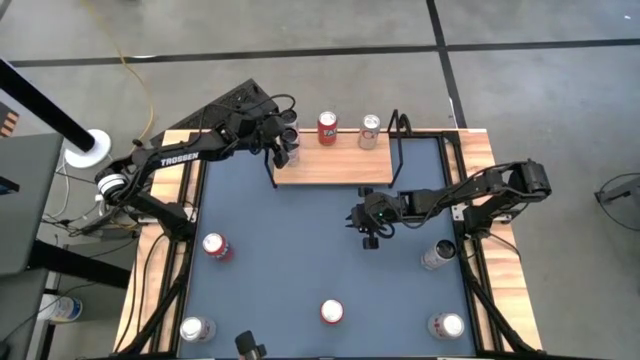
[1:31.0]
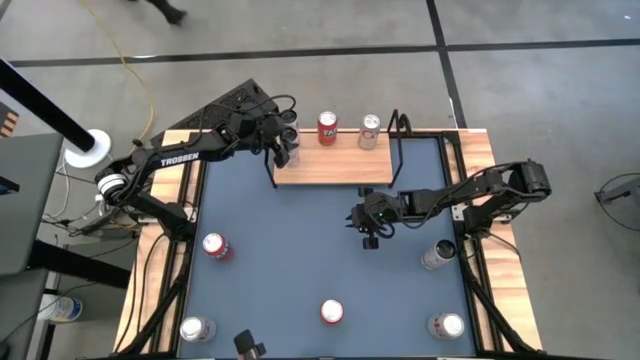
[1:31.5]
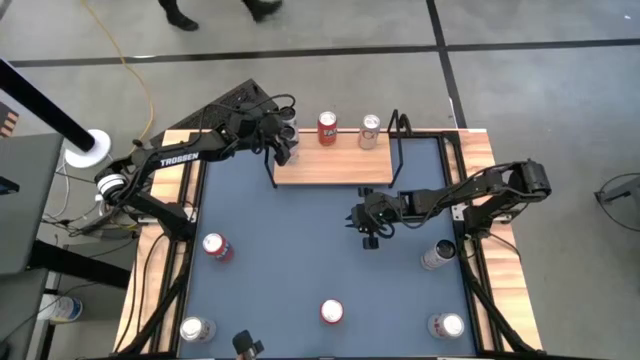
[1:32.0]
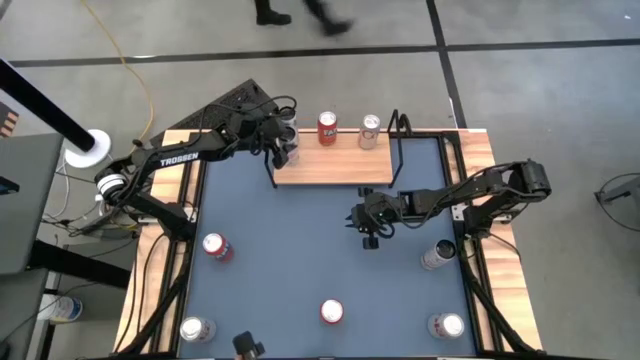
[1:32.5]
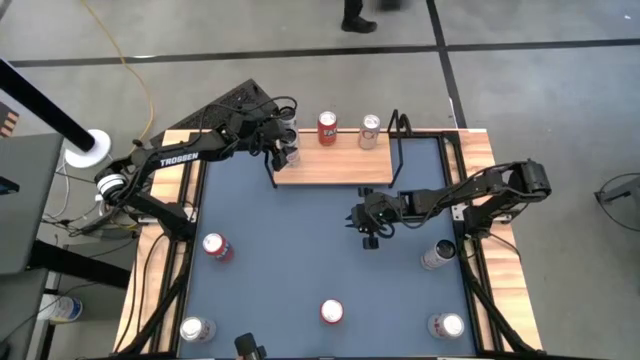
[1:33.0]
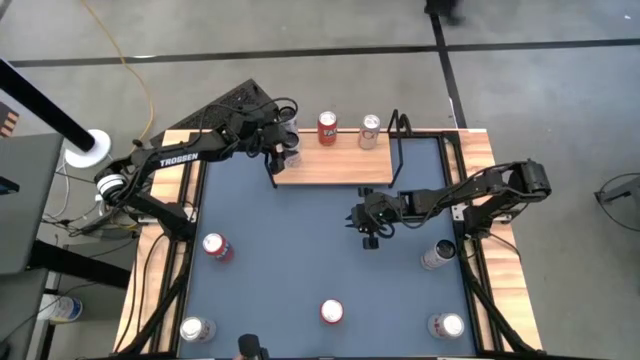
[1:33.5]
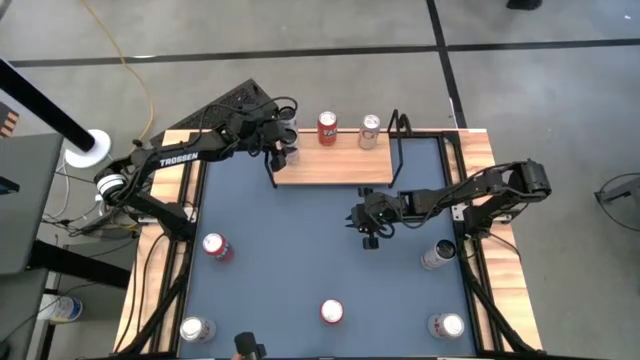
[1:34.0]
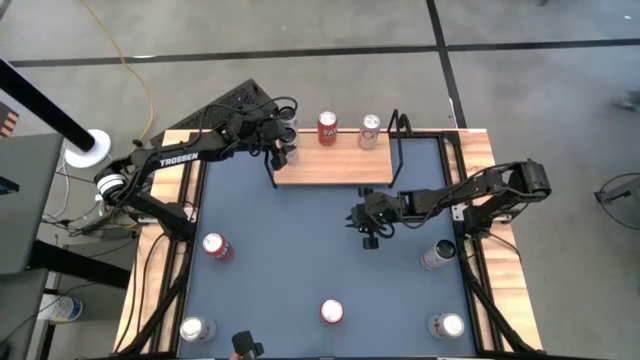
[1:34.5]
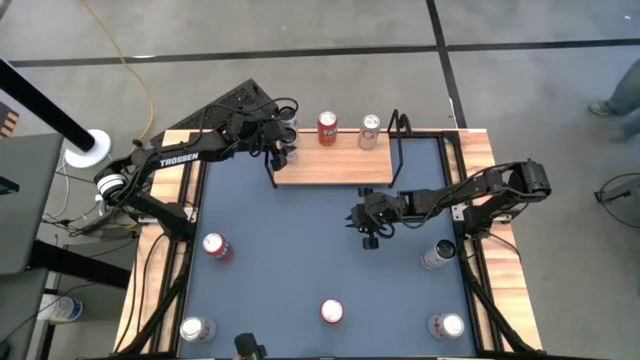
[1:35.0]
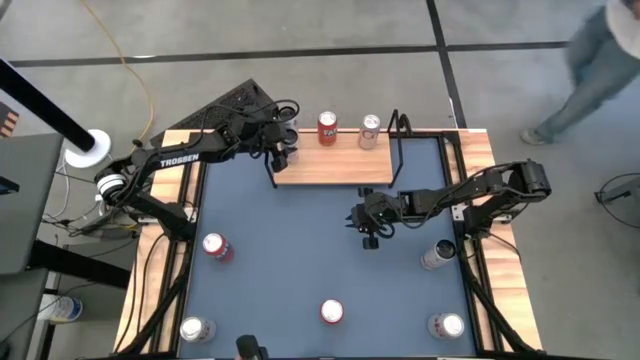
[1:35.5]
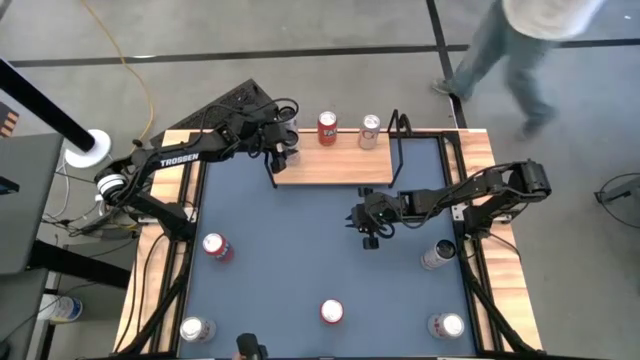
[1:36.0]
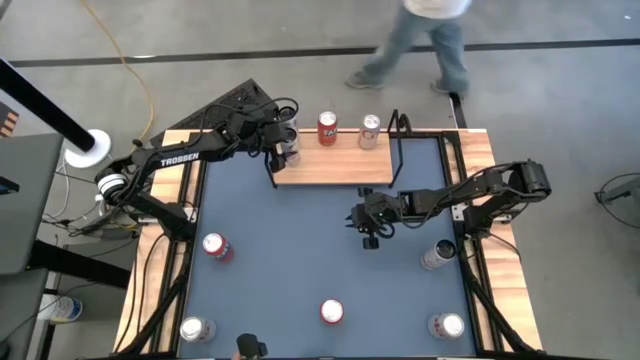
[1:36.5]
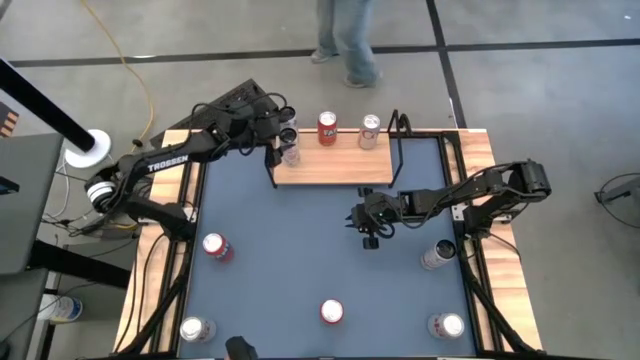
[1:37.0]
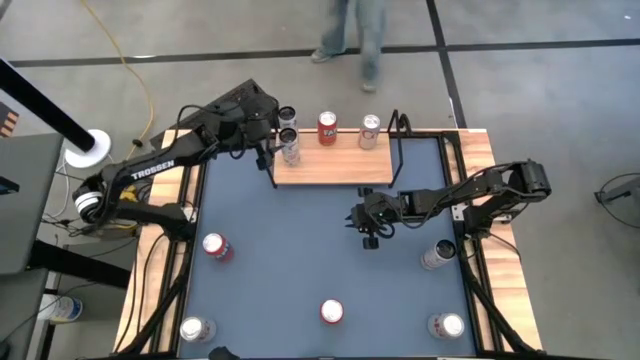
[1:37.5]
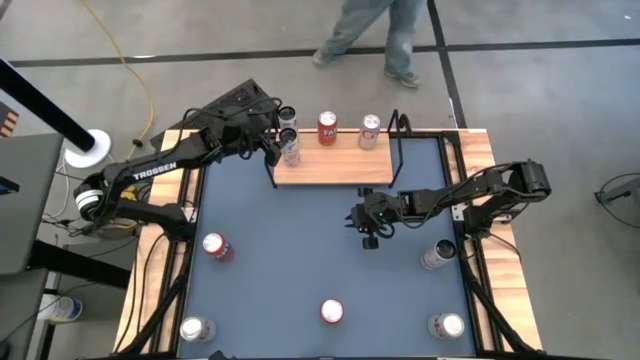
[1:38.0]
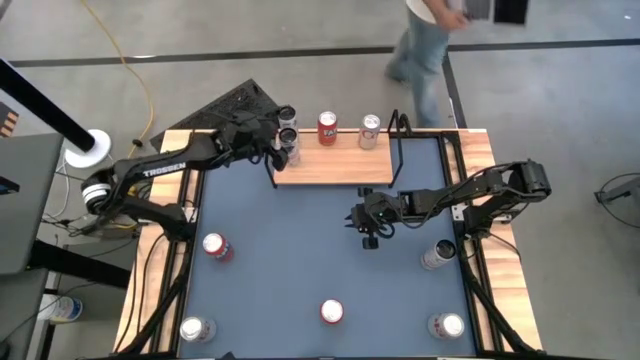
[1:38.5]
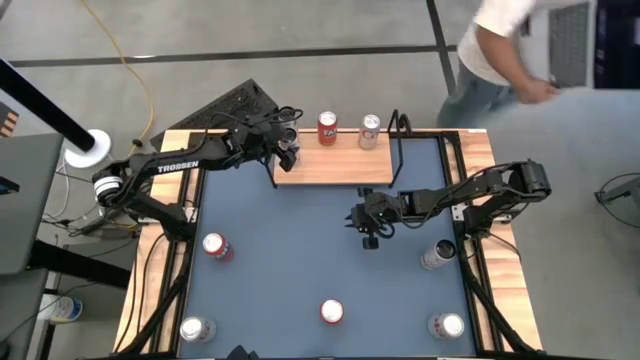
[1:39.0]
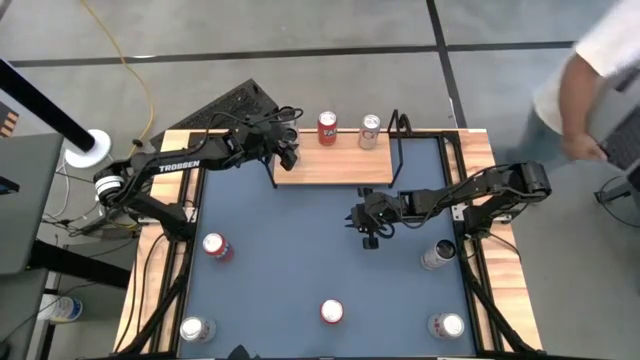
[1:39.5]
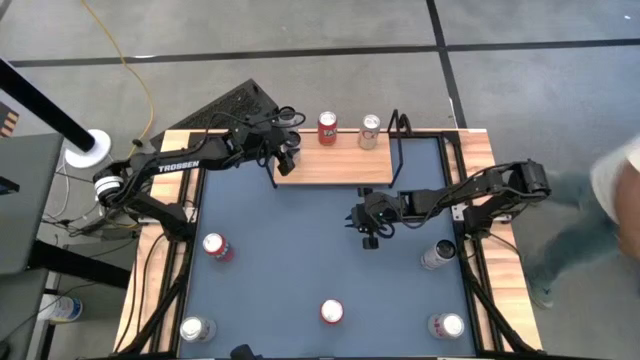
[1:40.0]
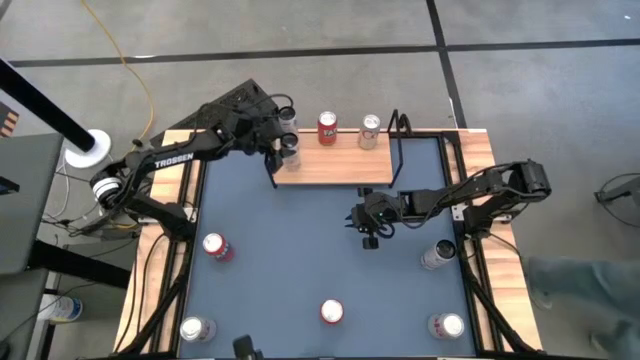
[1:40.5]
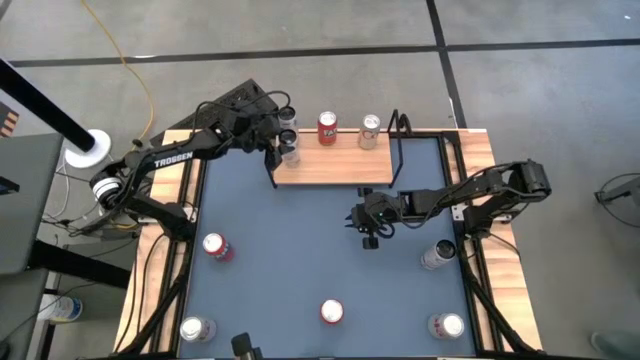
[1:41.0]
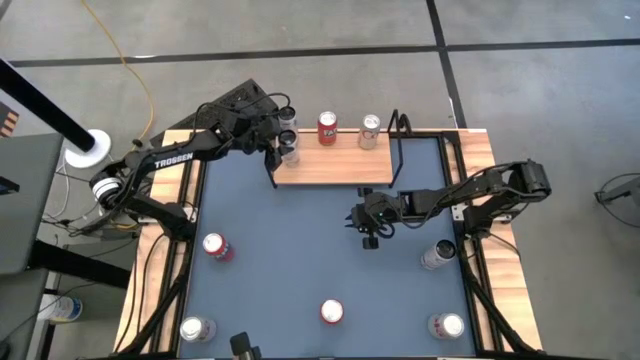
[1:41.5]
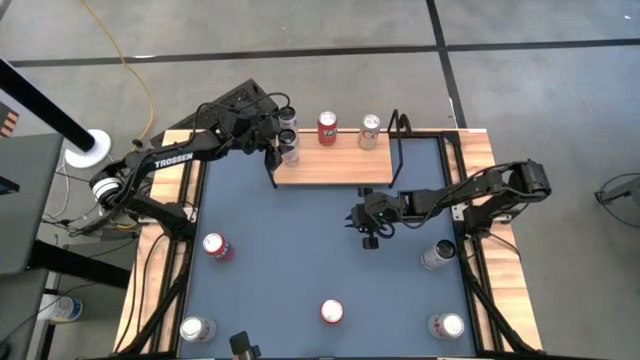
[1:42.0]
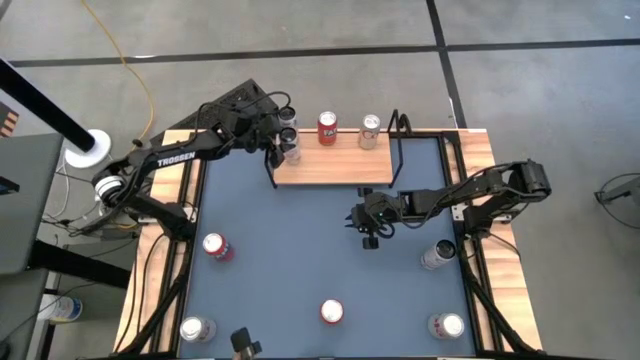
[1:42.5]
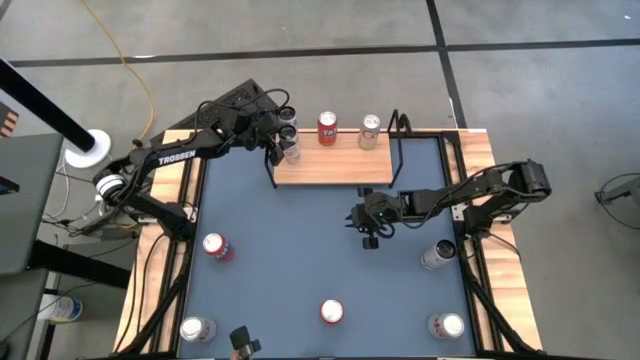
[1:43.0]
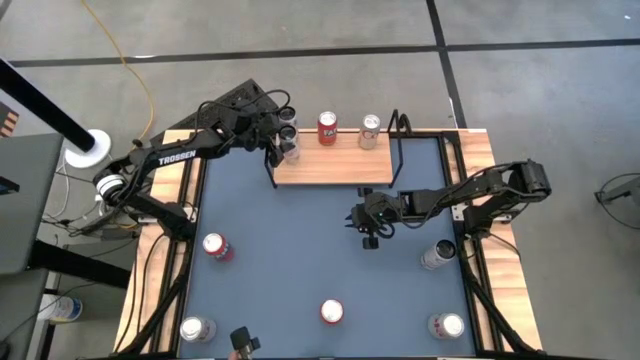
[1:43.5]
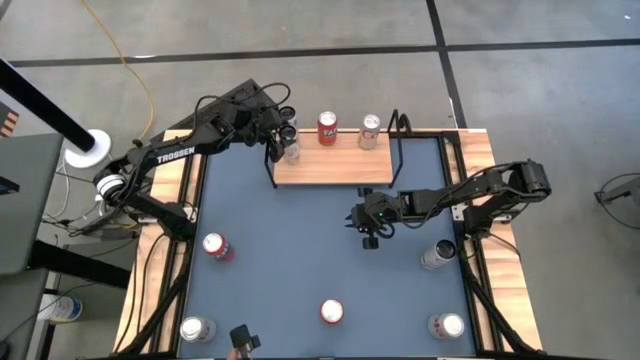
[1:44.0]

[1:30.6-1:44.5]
Task: Place canned beverage on shelf
Put the left white-pink soda can on the shelf aligned with the other white-pink soda can

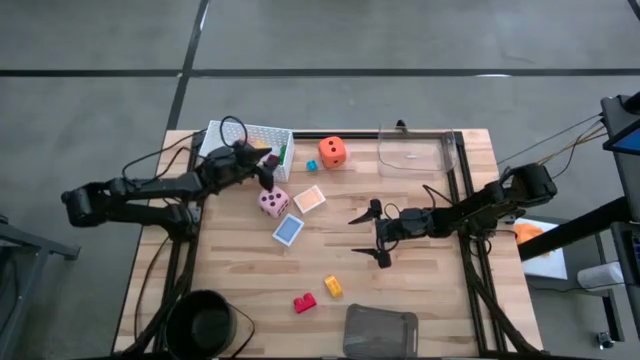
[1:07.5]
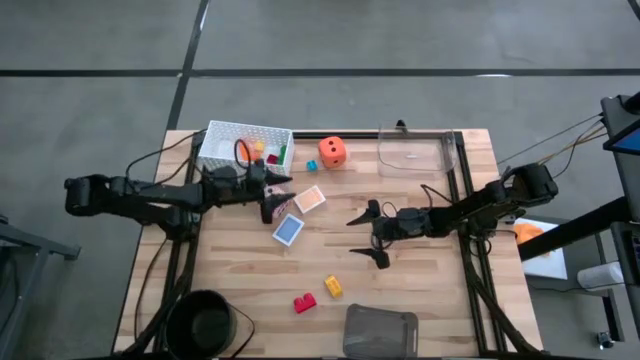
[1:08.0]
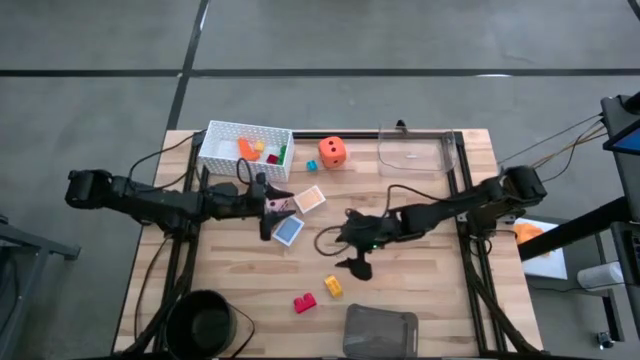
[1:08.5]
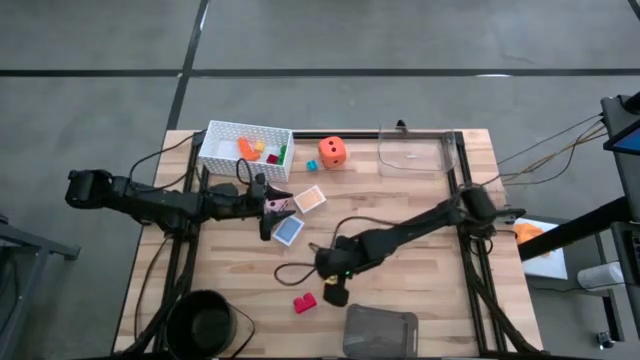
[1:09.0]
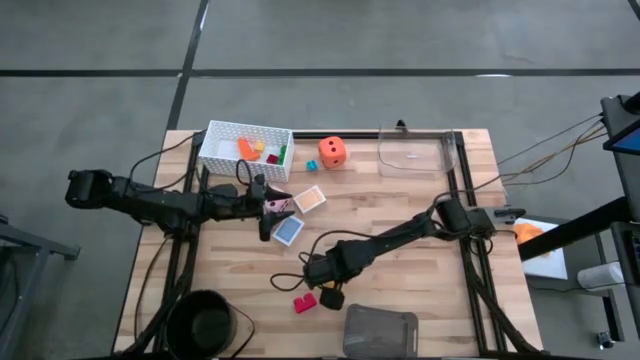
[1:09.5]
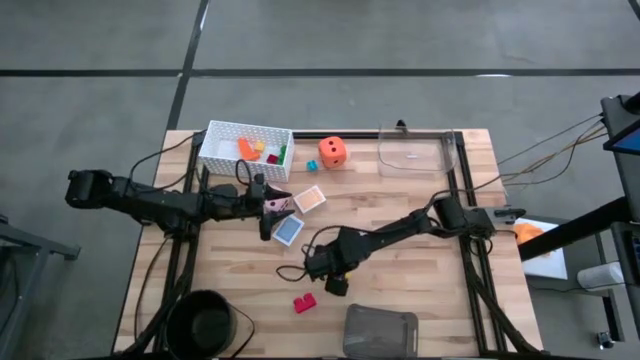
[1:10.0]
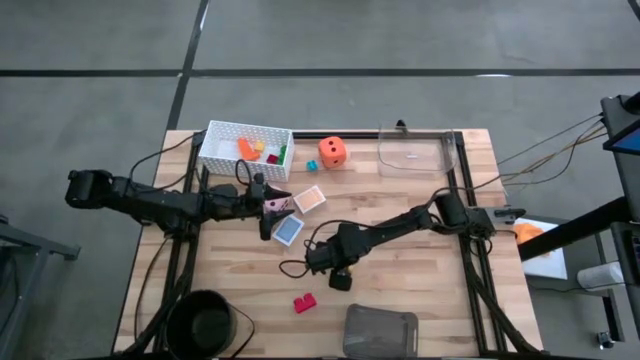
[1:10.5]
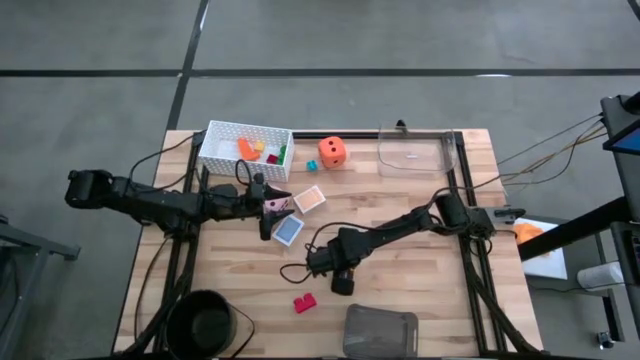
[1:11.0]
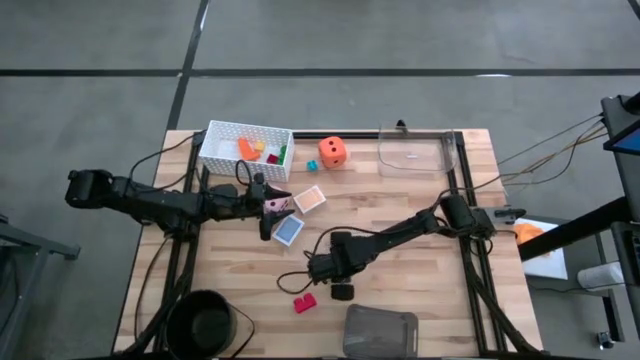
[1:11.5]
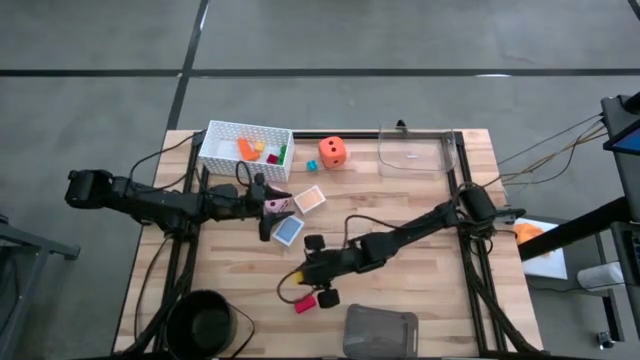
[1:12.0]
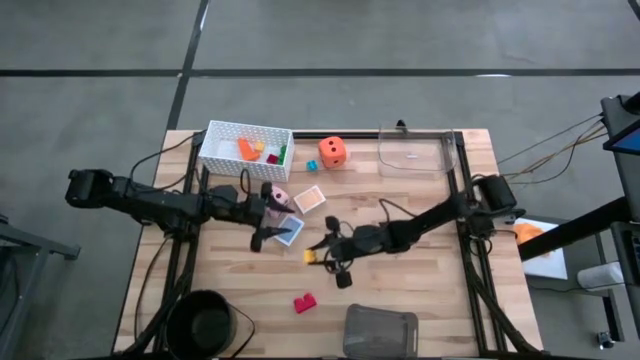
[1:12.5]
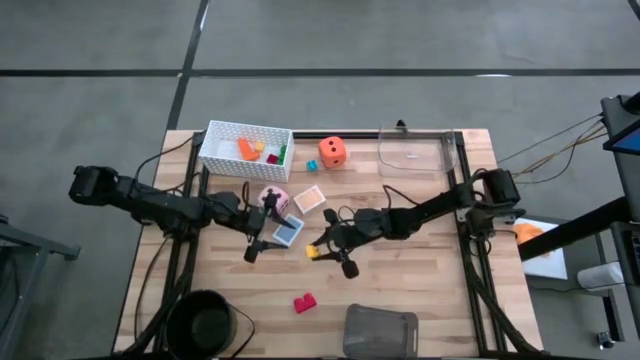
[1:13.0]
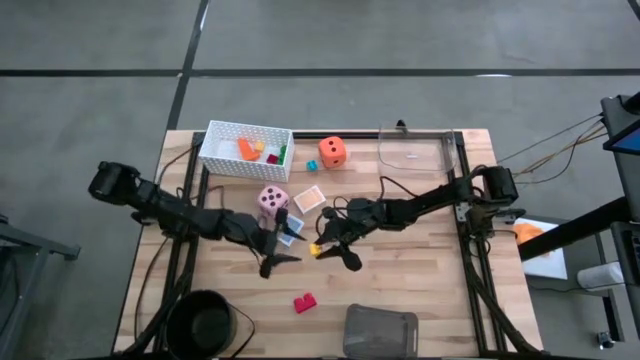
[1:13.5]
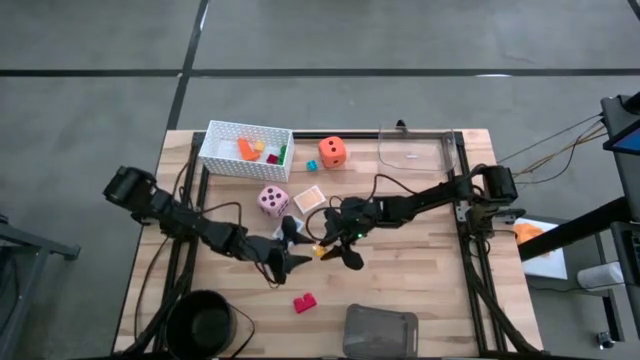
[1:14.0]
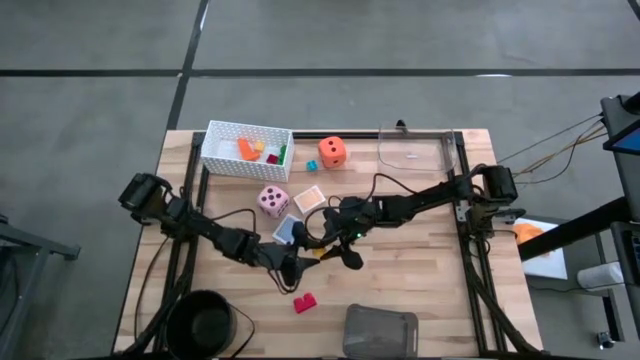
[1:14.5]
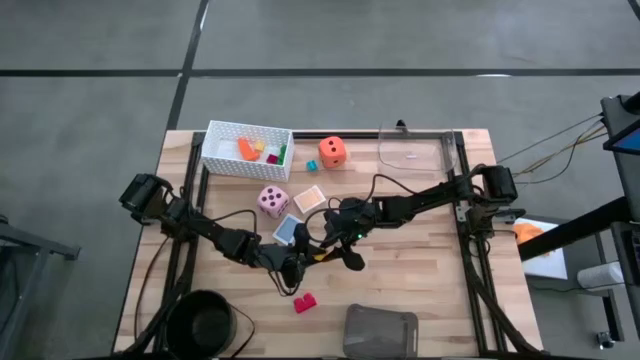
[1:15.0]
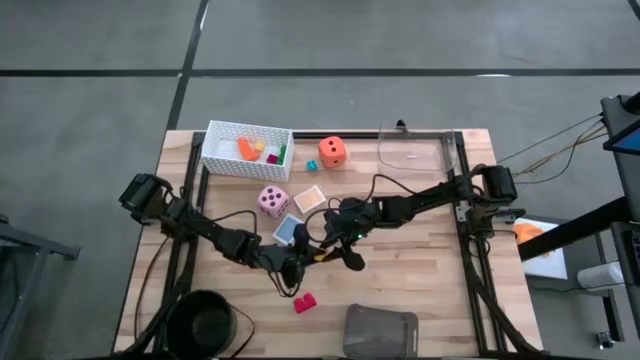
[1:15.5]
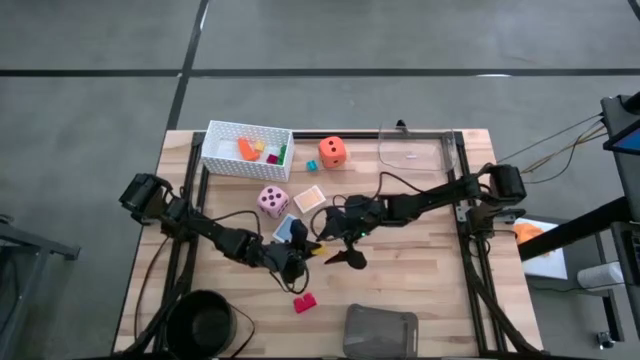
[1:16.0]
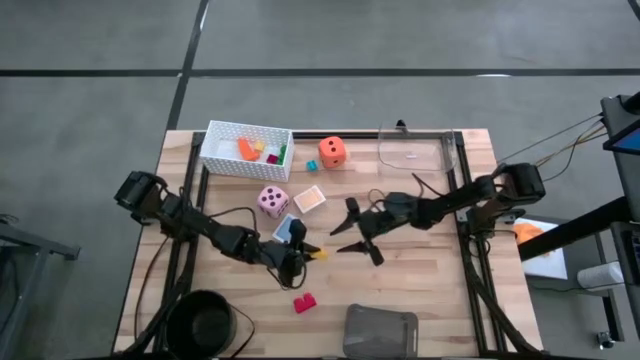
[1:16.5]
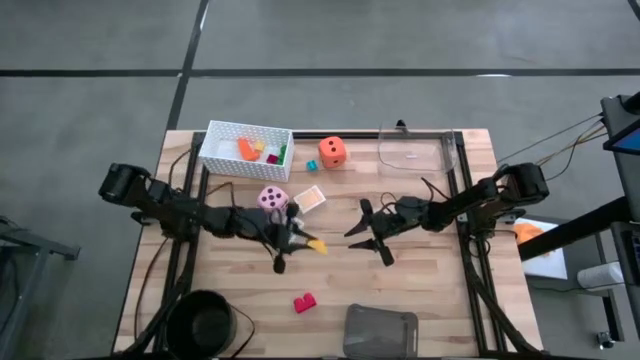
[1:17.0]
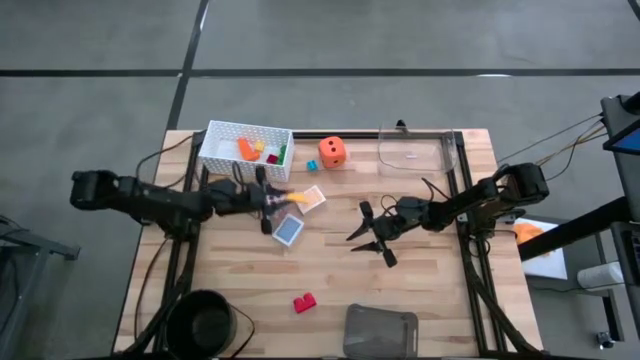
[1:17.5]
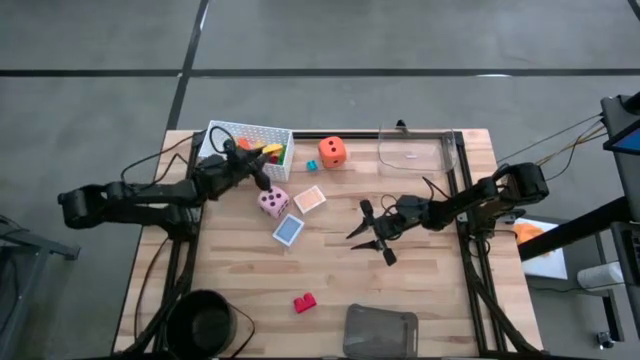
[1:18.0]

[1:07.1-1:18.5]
Task: Pick & Place Toys
Put the small yellow game piece into the white bin
